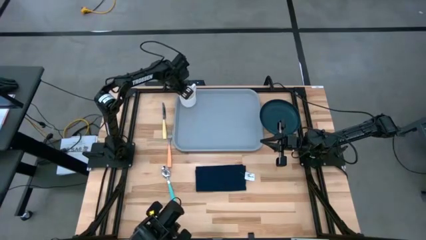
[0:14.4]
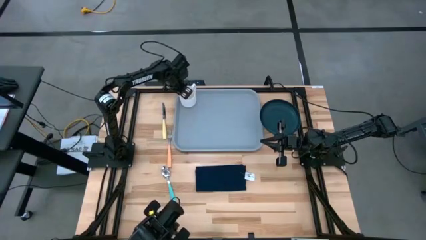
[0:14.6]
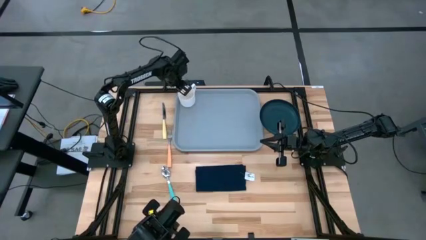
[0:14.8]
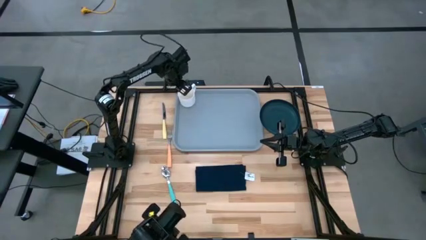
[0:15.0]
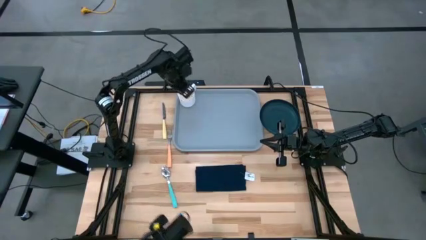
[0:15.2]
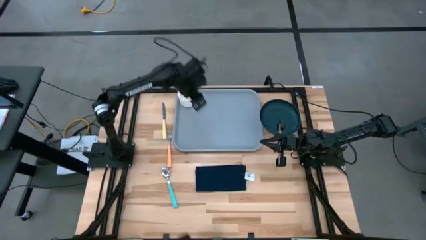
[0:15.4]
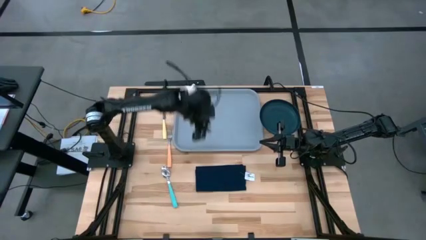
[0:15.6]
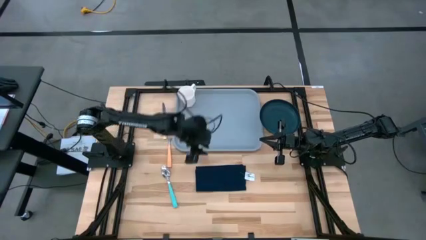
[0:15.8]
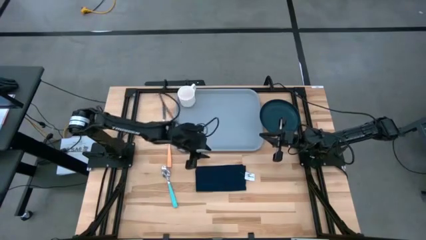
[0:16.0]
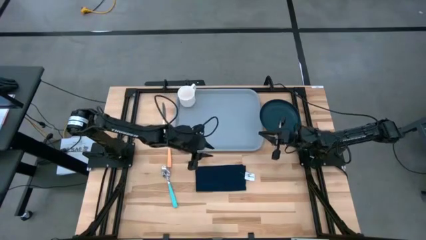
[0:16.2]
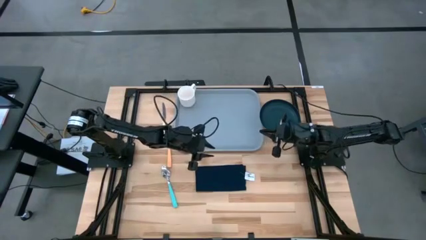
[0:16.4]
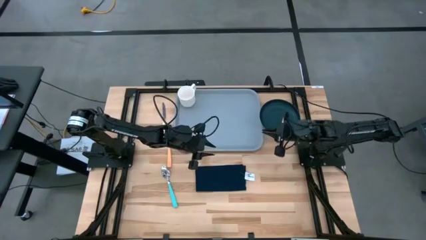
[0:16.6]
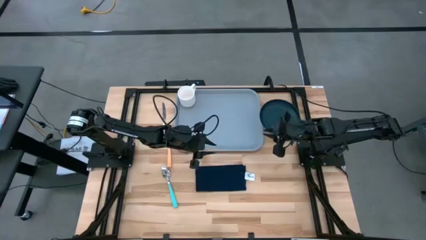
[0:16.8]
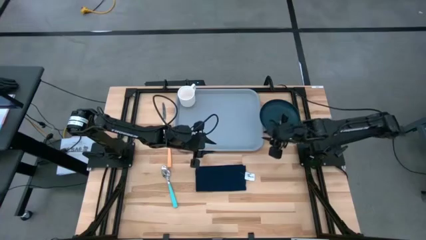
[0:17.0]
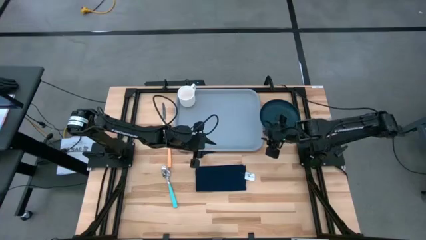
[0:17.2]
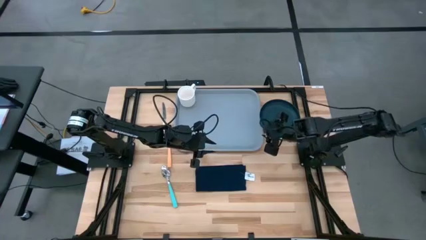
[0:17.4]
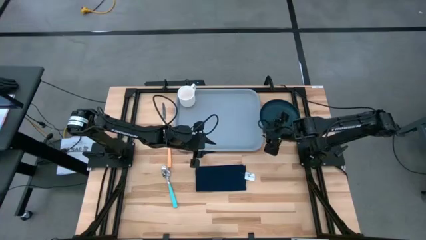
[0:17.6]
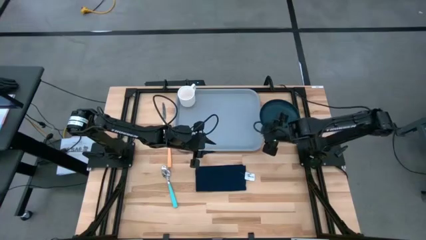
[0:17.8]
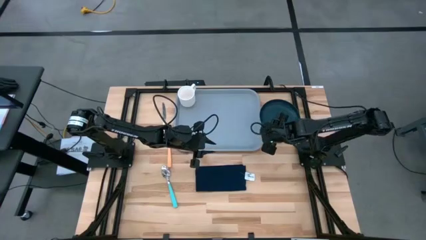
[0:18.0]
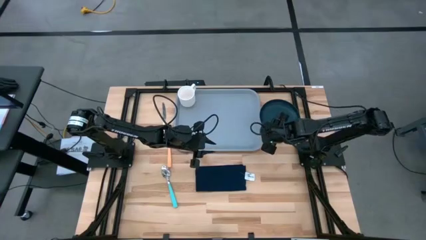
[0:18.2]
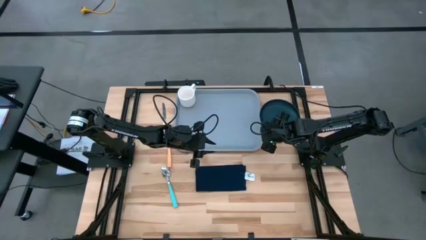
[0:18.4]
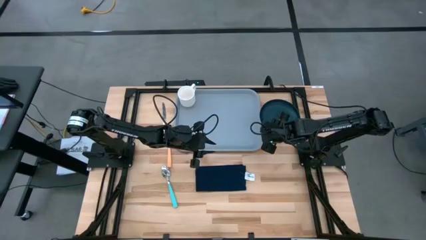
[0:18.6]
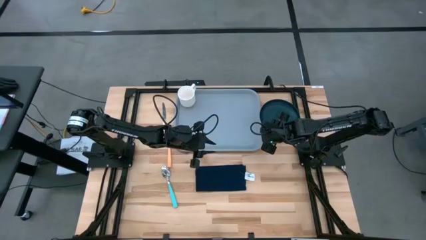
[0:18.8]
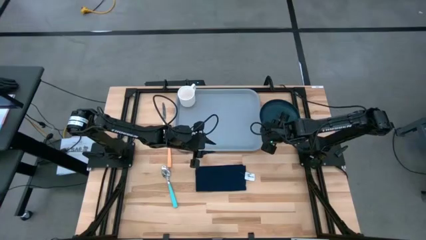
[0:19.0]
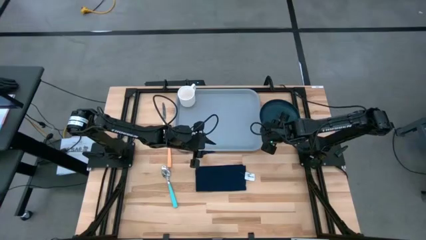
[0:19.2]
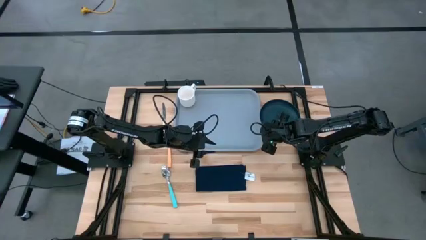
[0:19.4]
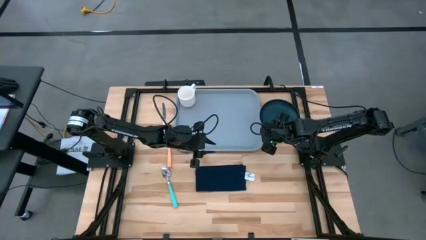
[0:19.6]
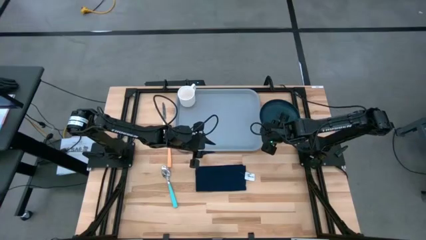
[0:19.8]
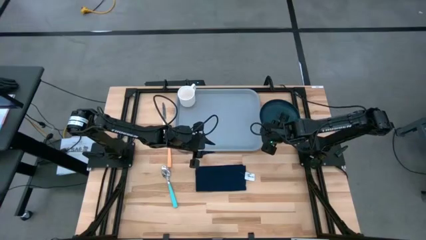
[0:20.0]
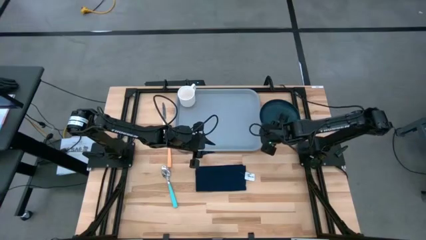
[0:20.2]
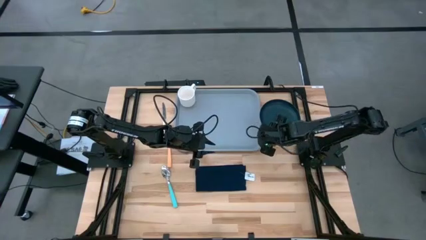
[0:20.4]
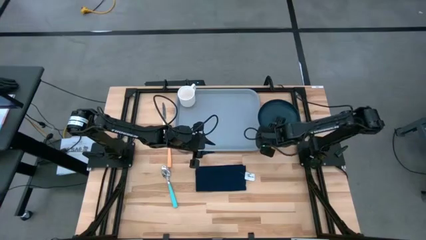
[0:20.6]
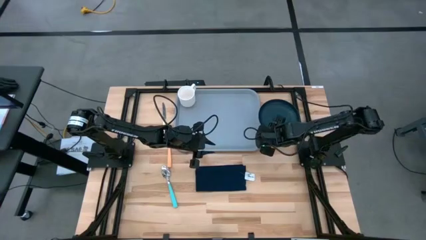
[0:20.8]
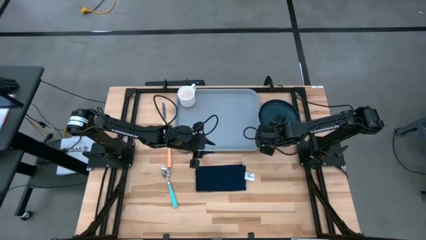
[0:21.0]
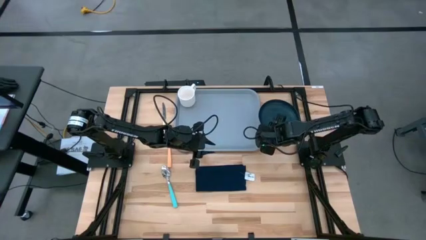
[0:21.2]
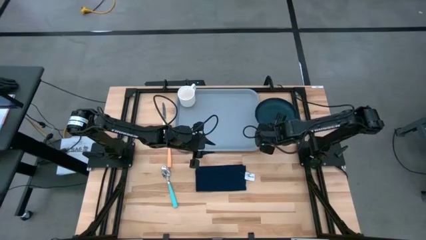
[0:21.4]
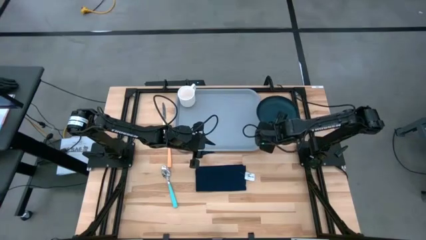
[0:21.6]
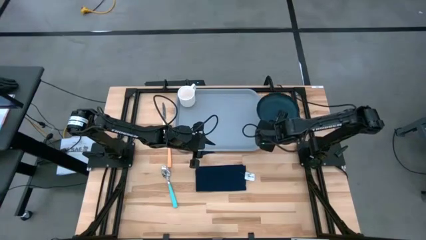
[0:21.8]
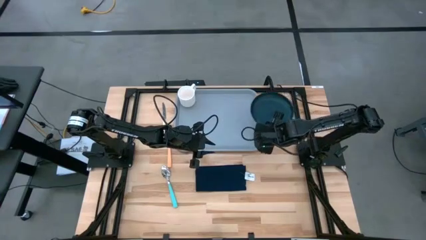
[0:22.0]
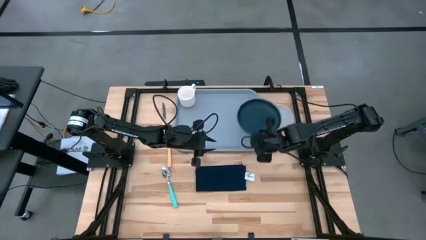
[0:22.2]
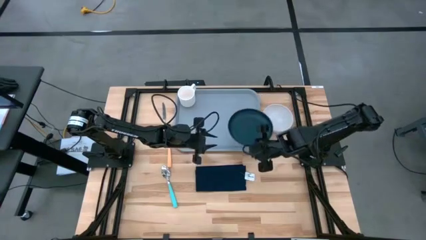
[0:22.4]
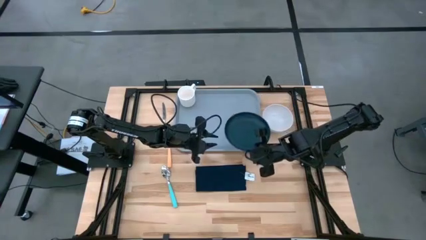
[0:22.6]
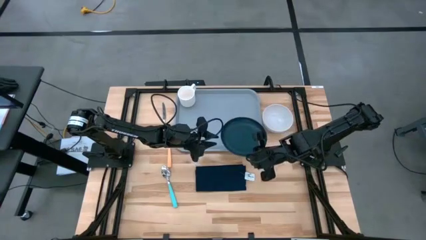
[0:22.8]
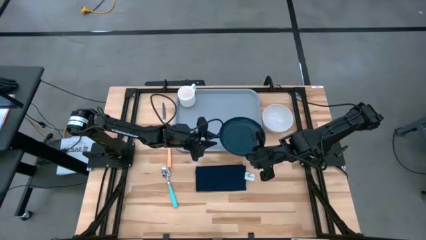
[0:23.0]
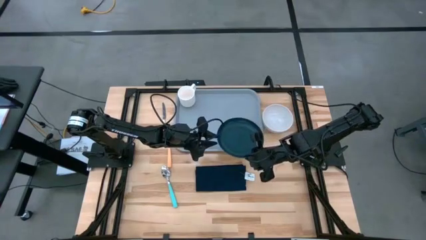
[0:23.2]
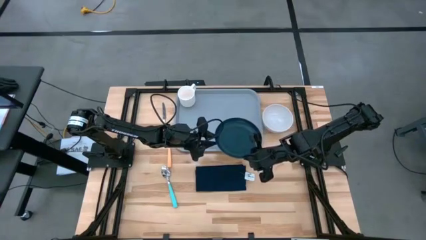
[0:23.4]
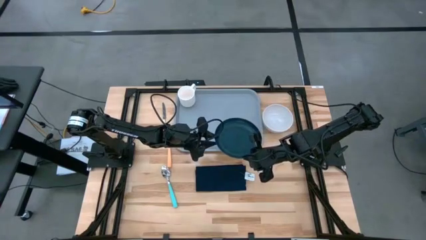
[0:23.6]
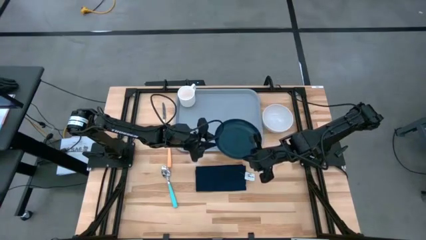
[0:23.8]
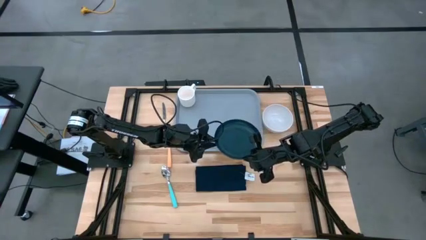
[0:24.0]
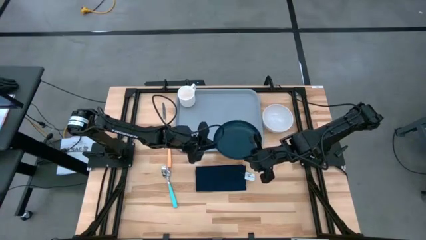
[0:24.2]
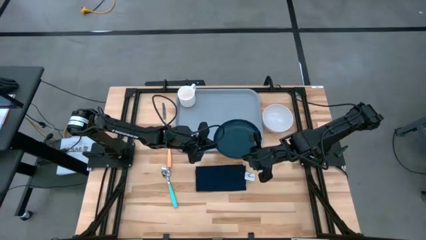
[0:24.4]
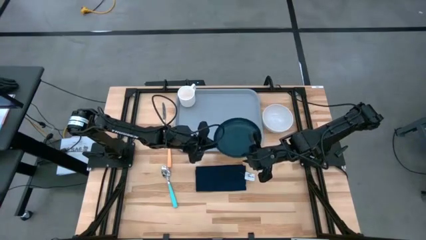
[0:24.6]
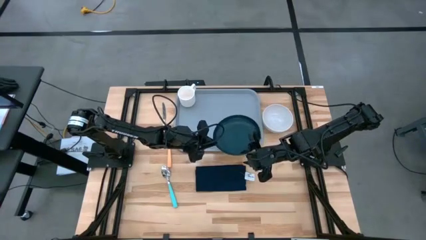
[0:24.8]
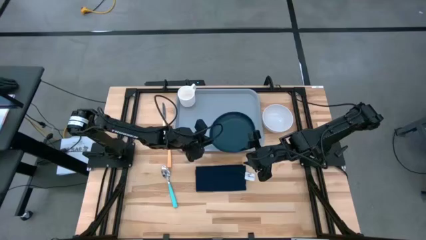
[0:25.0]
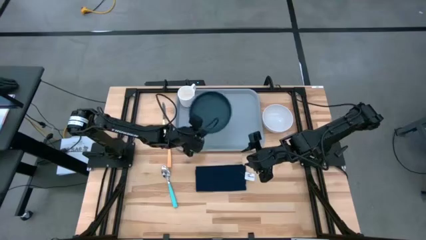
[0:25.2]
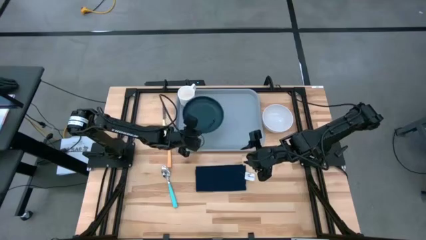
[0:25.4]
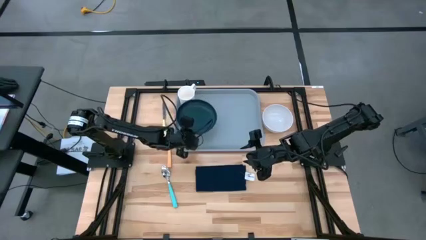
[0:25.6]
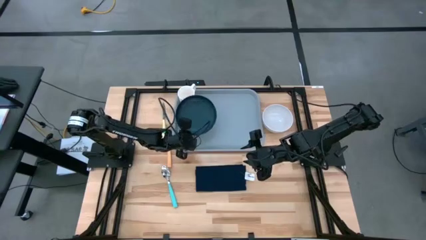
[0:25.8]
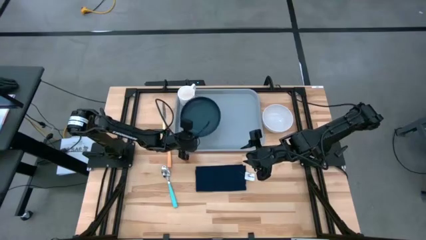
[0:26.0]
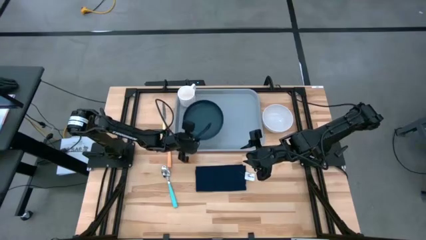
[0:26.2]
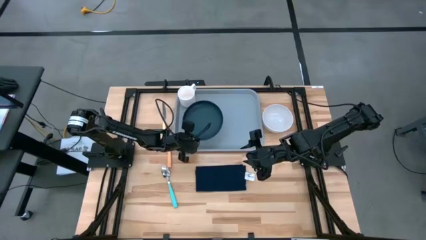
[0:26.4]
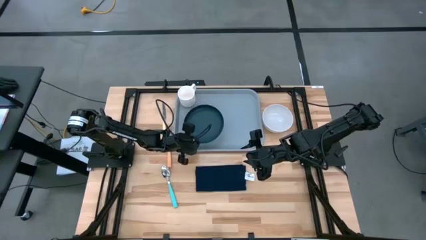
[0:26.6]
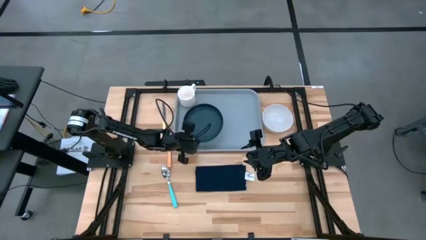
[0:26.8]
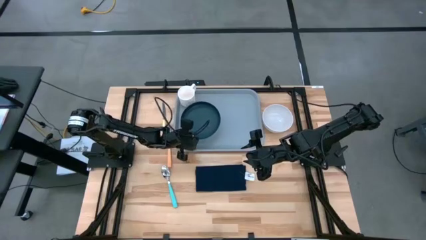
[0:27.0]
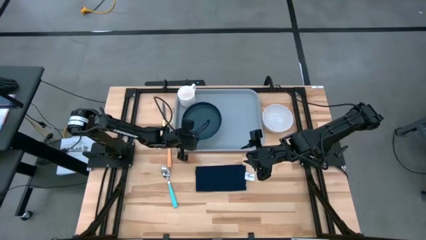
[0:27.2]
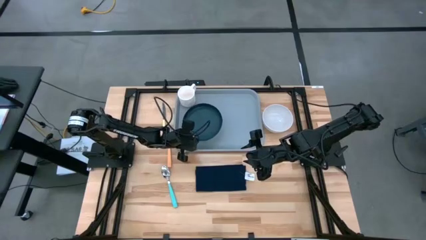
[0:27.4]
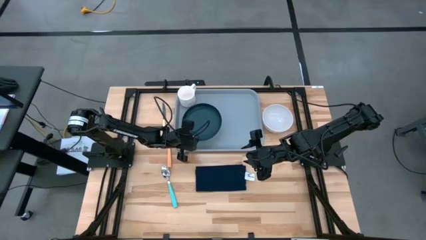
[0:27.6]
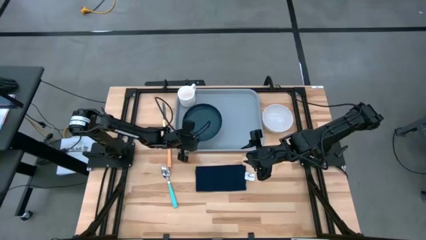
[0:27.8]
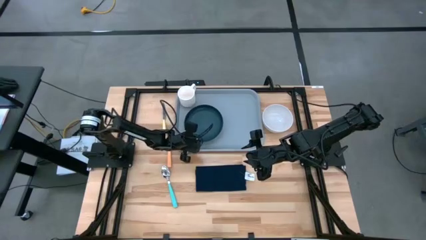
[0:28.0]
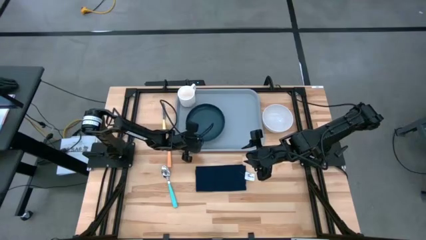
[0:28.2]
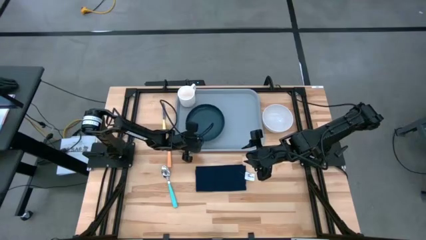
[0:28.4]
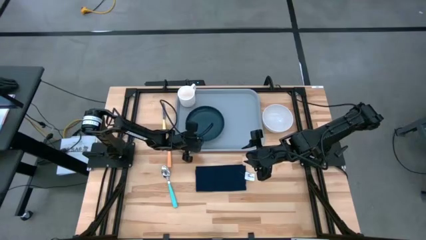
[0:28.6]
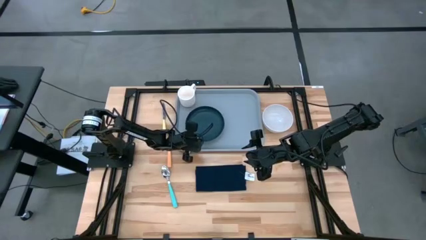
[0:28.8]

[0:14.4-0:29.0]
Task: Set up tray
Put the black plate to the bottom right of the white mug on the gray tray
